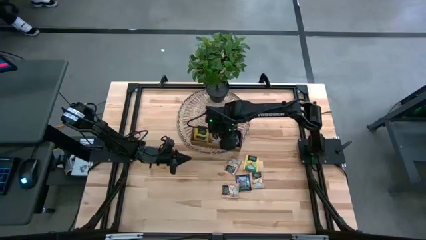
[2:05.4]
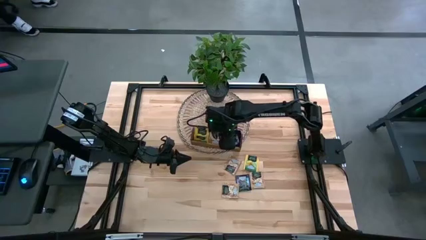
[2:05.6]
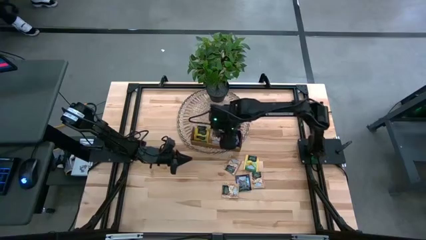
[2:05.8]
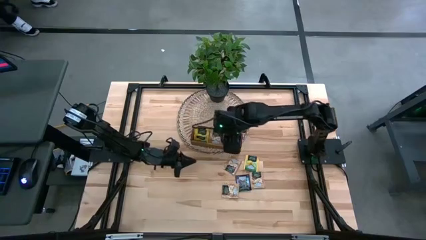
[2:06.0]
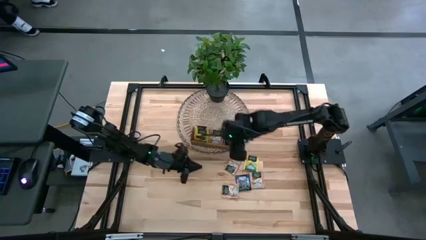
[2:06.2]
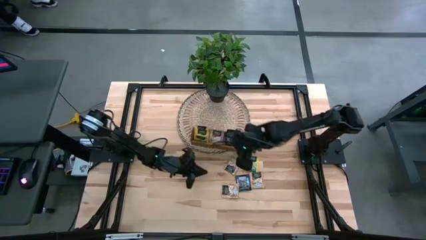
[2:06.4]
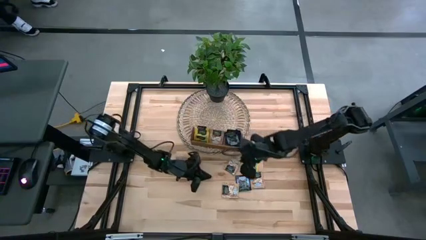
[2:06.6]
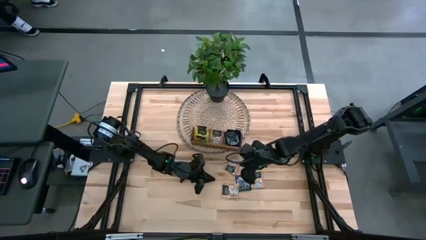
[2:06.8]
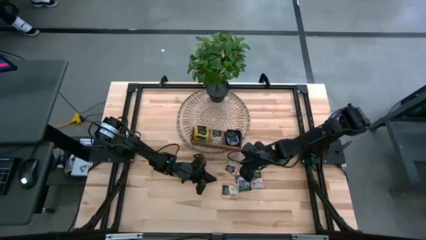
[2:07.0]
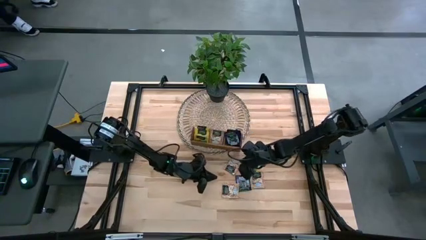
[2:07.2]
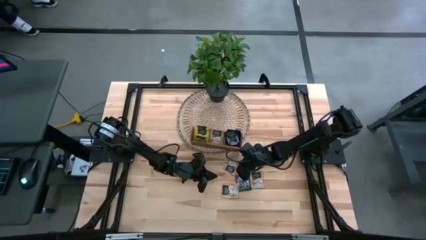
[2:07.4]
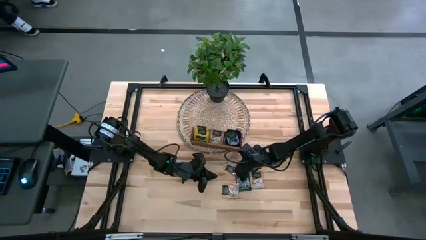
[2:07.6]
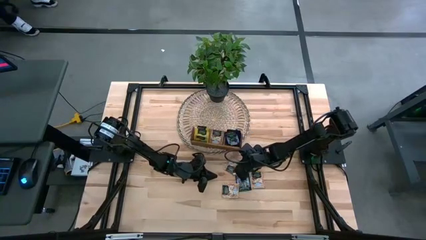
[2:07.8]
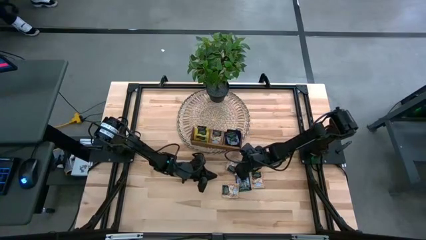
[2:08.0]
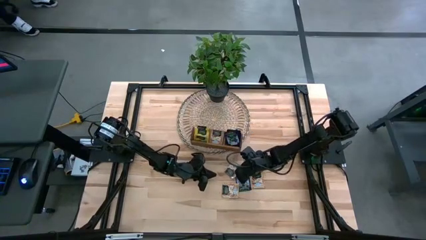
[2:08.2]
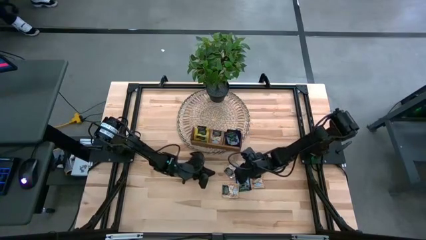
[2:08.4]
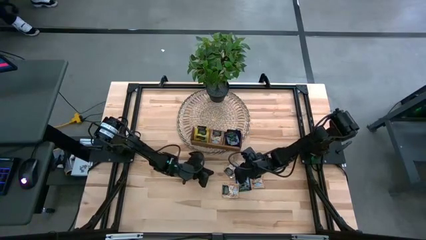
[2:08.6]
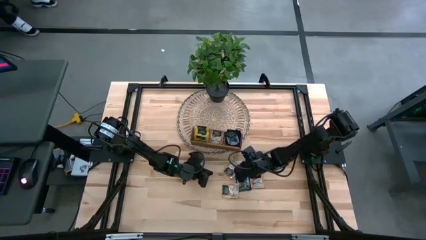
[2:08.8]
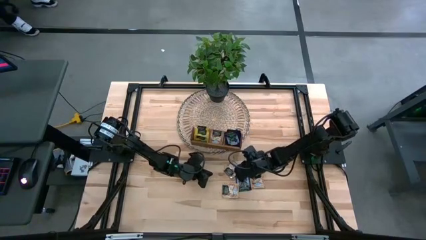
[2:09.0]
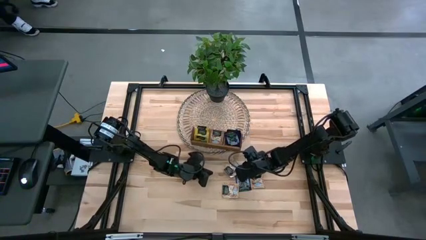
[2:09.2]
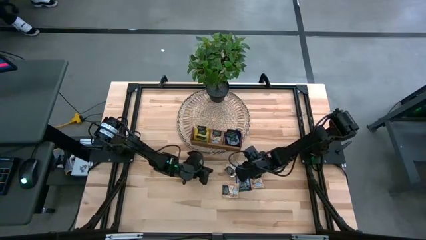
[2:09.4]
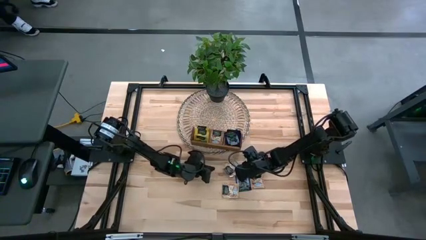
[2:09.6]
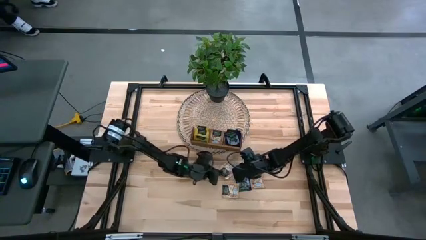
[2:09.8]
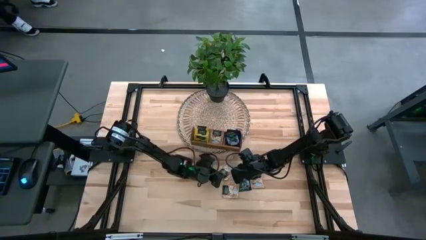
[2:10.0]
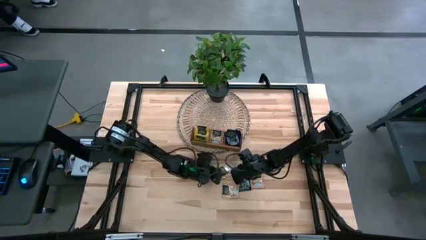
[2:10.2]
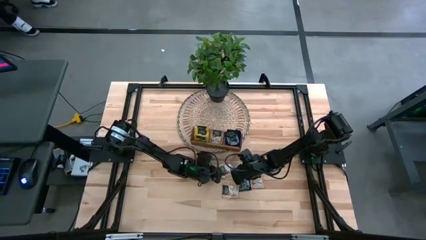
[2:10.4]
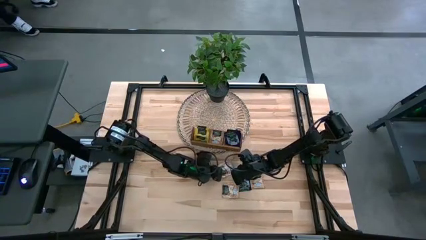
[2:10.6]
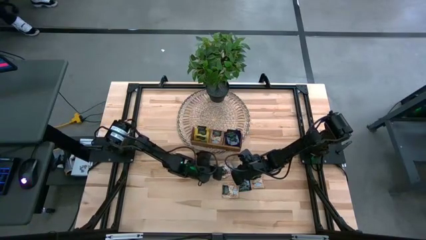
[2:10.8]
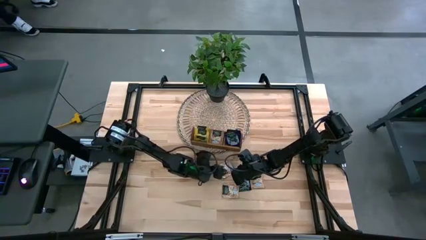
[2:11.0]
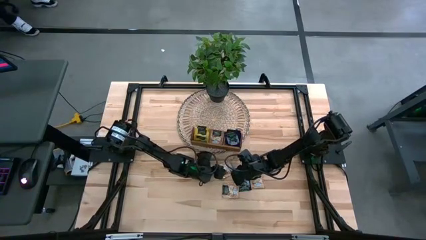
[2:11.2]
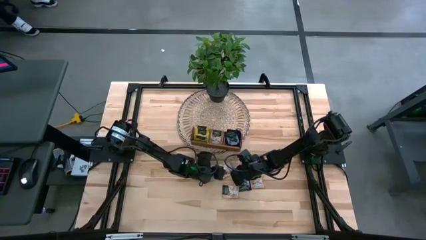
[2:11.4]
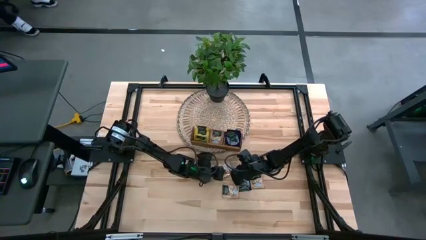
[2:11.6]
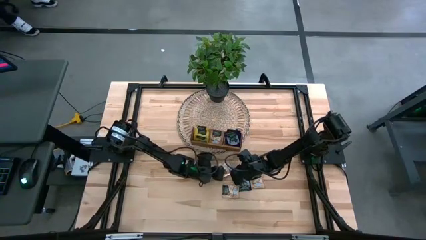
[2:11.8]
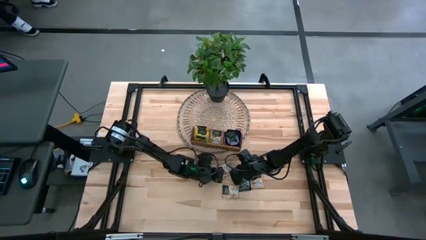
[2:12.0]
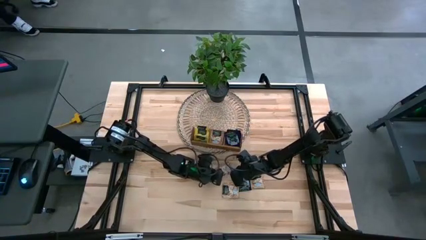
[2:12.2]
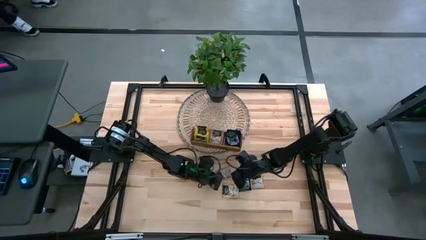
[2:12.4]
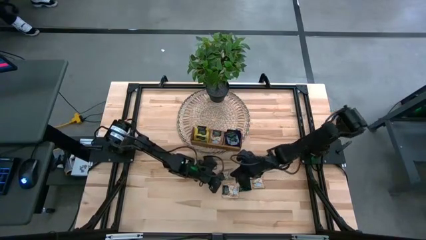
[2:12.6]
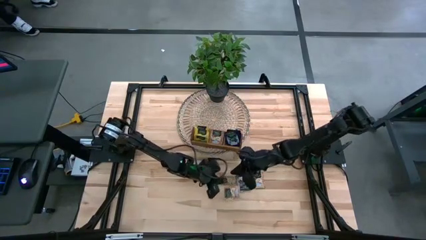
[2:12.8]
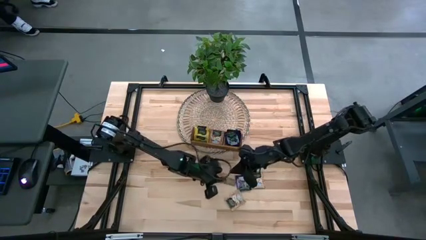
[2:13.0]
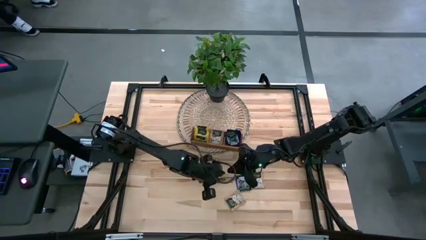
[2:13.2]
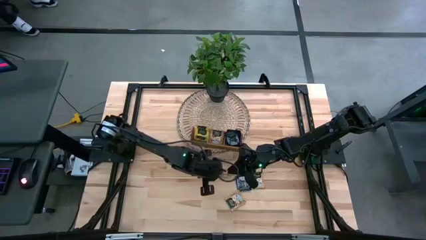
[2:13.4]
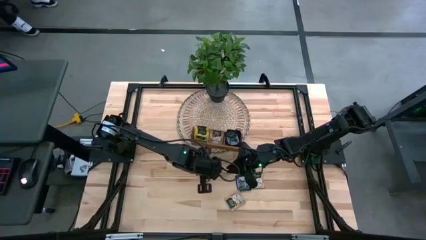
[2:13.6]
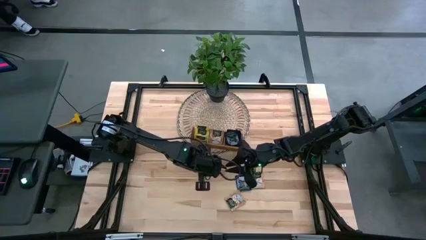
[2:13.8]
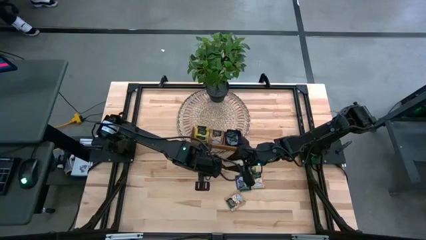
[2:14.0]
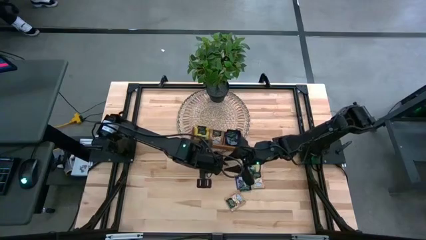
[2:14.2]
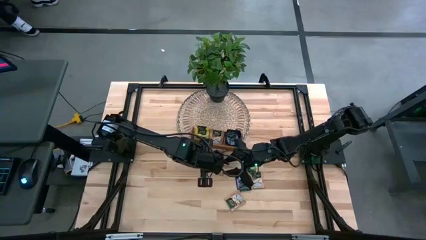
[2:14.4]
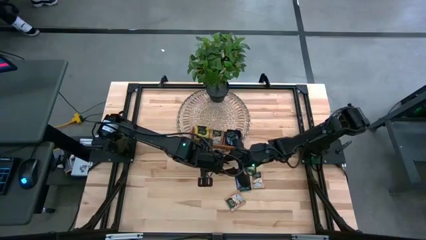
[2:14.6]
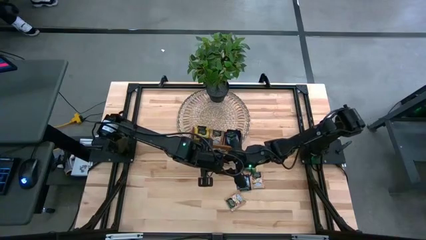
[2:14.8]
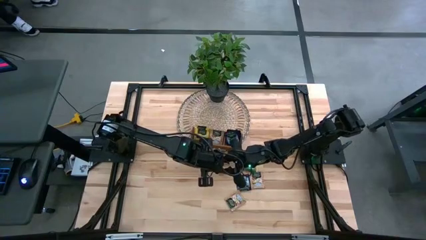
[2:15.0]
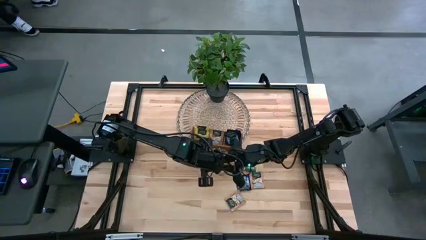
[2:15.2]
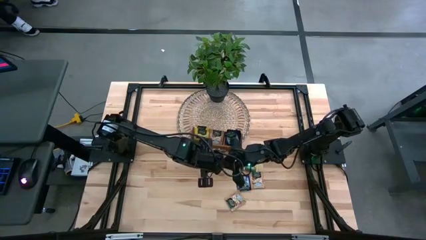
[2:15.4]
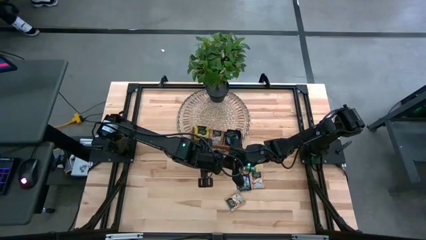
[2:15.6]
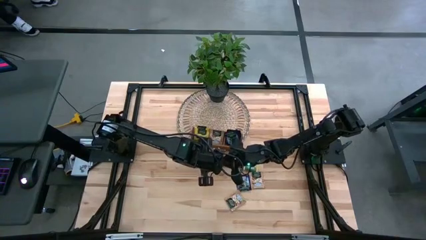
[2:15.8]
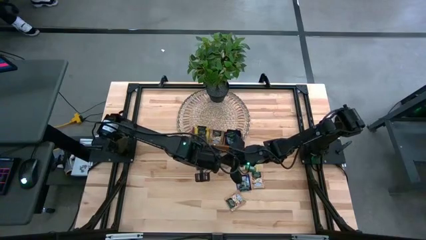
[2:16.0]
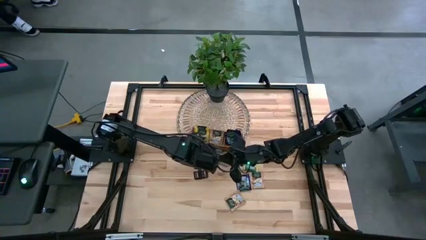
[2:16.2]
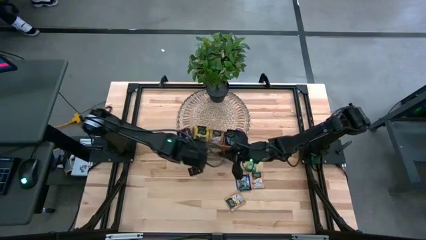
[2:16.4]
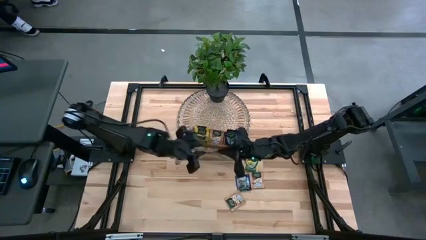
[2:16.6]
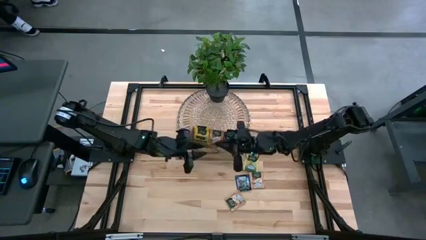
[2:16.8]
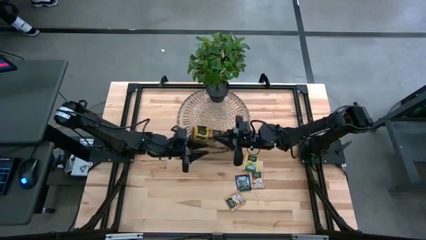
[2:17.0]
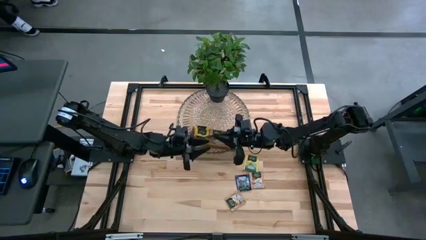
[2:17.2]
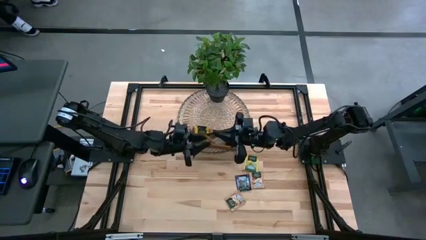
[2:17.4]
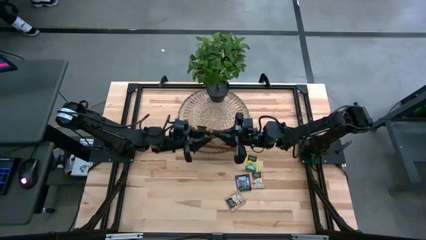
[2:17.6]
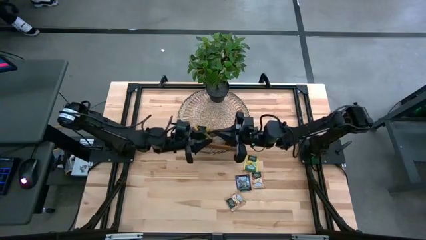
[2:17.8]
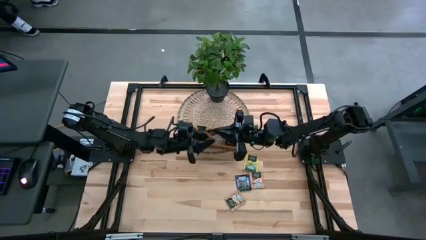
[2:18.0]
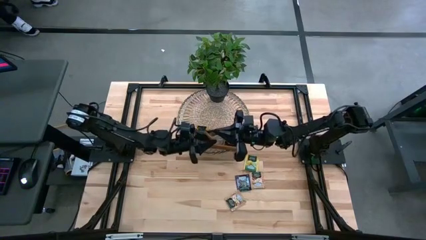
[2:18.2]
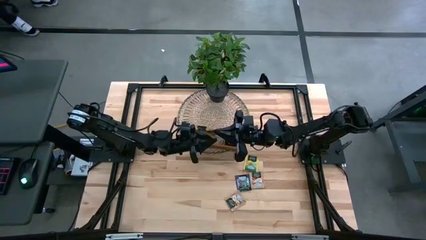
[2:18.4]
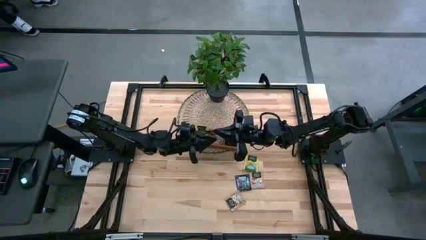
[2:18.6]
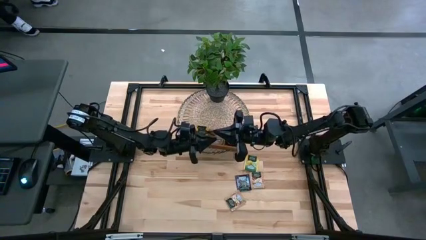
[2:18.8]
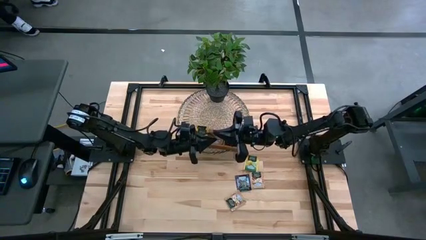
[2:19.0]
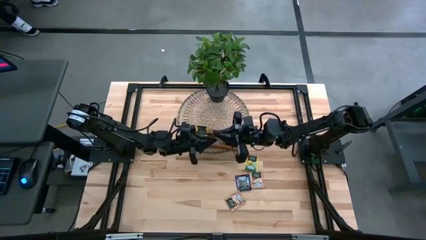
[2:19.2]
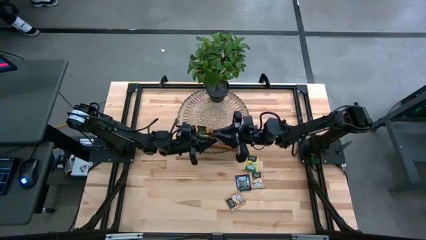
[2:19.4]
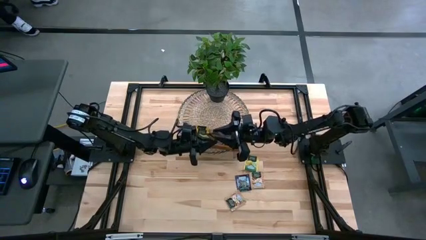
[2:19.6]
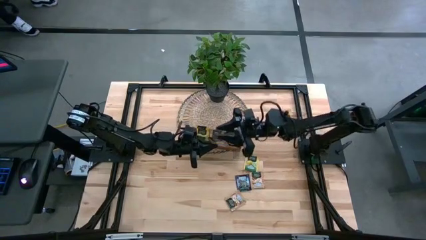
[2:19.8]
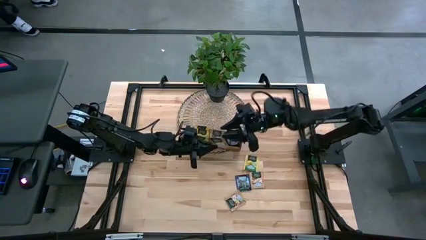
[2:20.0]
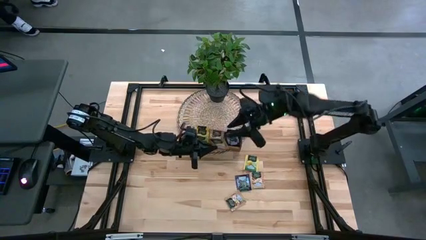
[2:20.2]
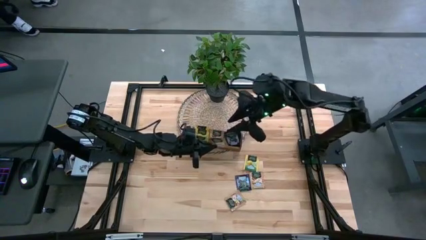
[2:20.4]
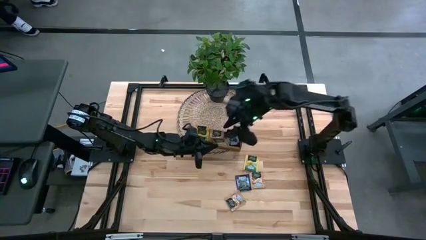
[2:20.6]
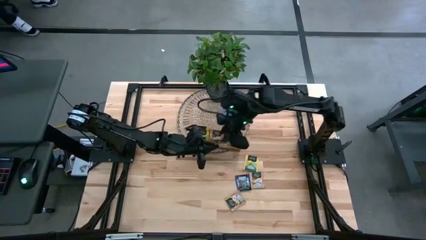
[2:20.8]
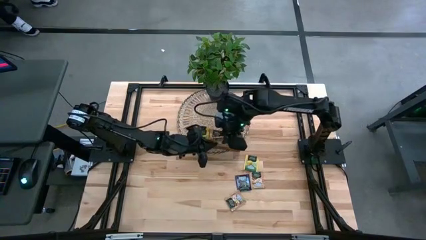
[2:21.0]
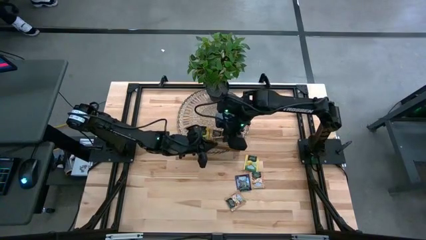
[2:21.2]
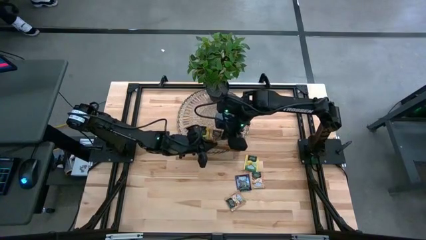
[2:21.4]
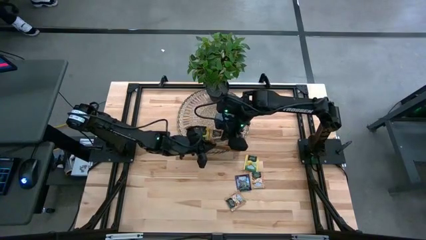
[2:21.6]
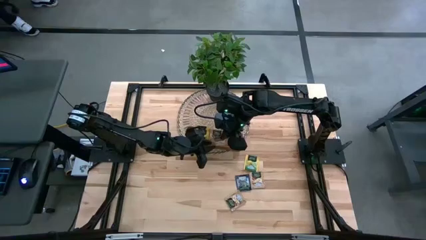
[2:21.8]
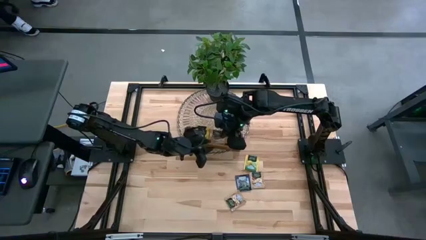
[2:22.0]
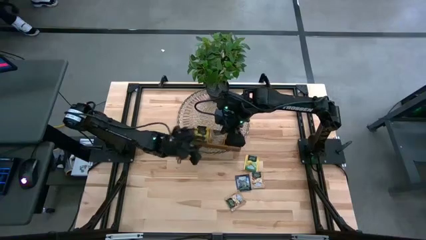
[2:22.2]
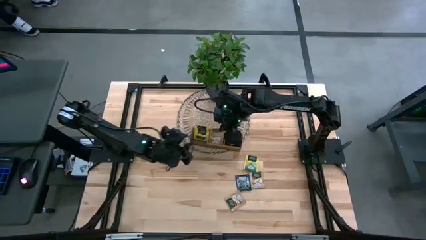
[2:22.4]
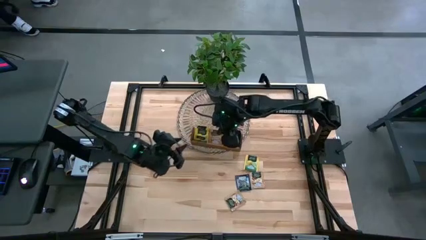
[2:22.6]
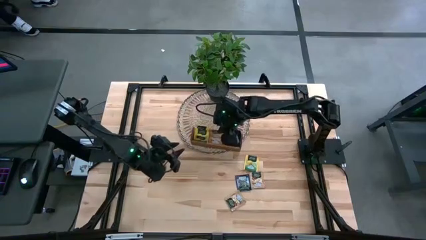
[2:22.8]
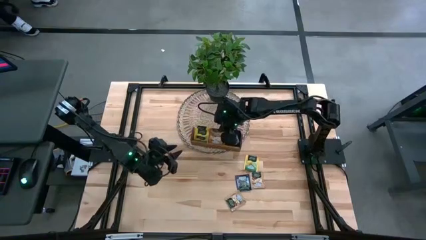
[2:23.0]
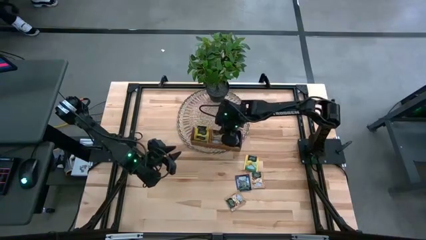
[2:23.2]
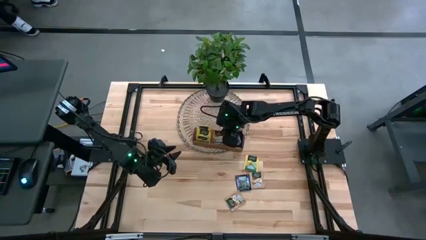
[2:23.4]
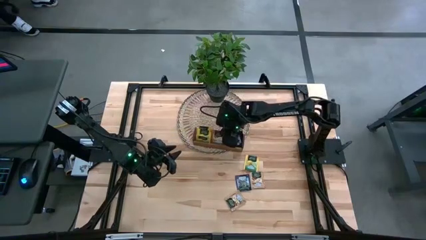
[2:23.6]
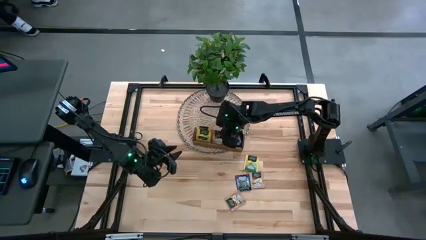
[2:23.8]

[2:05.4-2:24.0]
Task: Pick & Place Tea
Put the brown tea bag into the middle section of the wooden organizer
